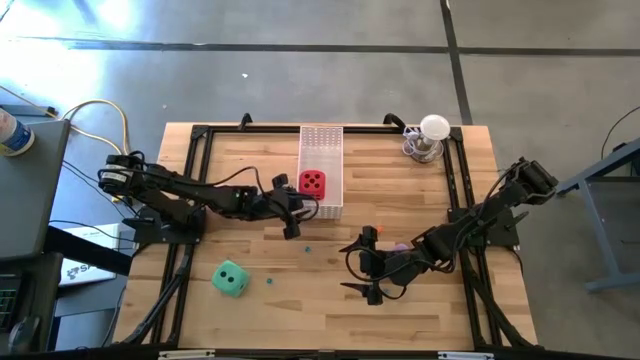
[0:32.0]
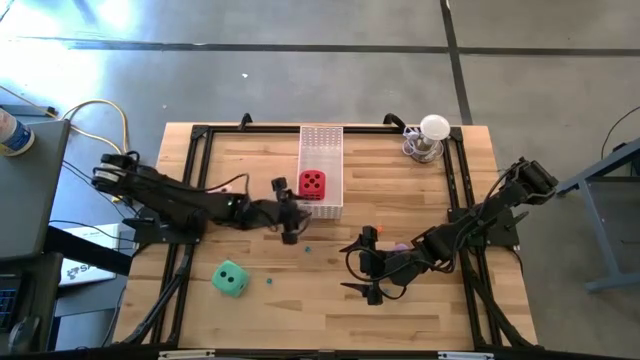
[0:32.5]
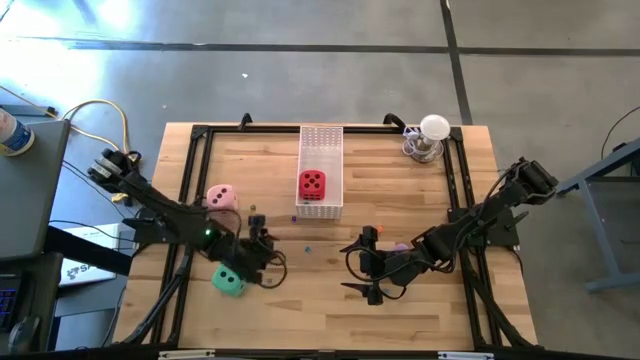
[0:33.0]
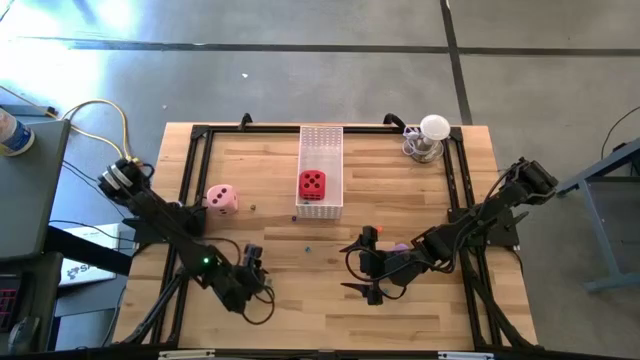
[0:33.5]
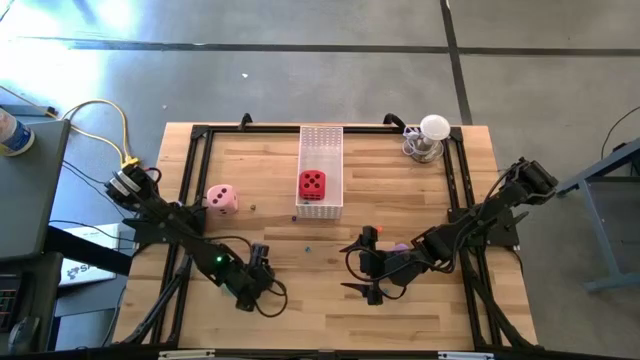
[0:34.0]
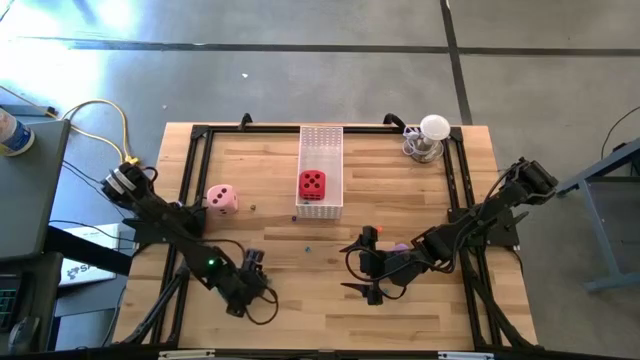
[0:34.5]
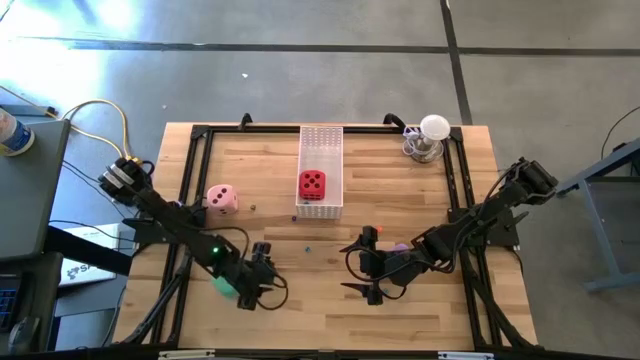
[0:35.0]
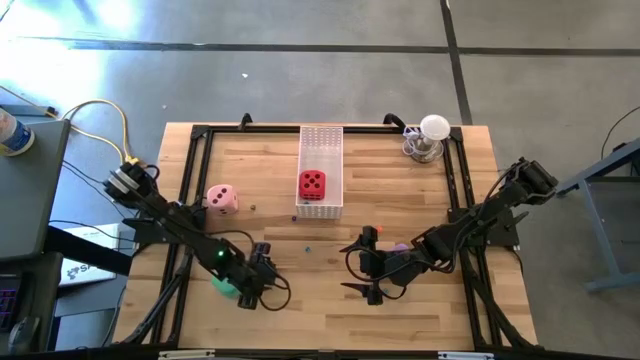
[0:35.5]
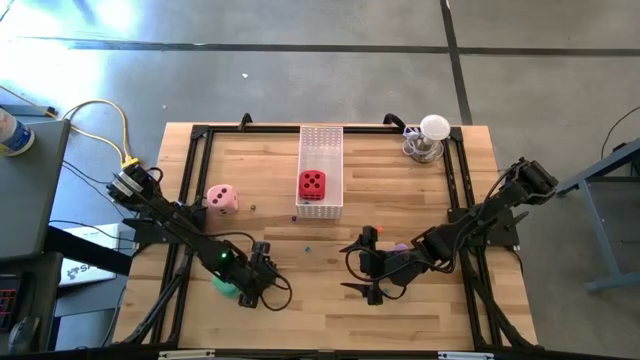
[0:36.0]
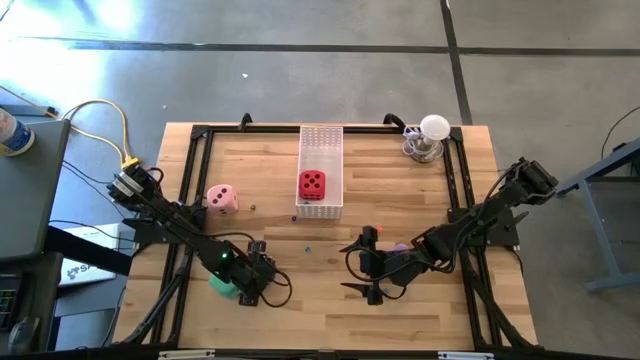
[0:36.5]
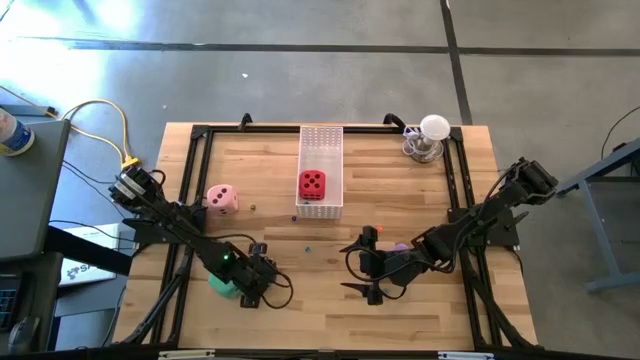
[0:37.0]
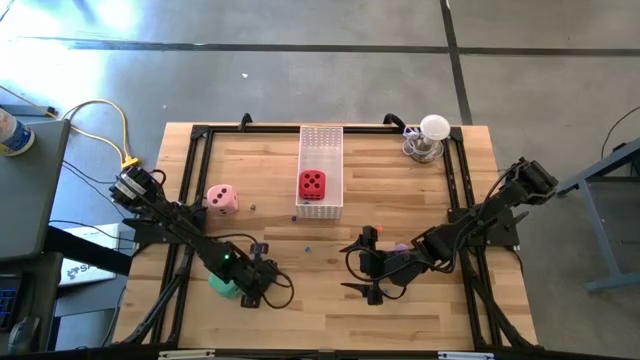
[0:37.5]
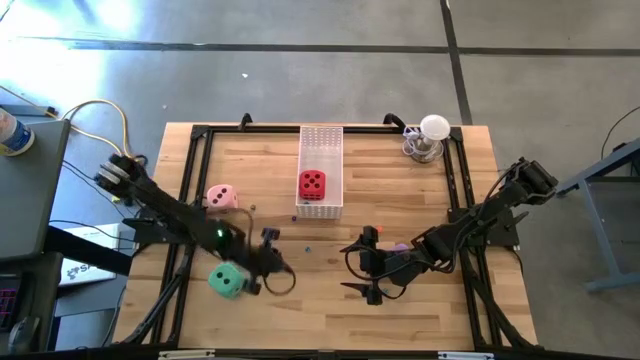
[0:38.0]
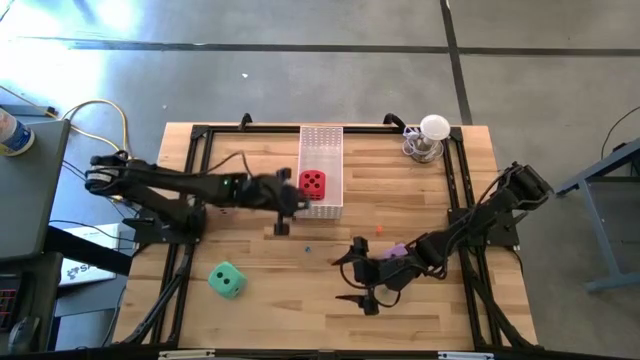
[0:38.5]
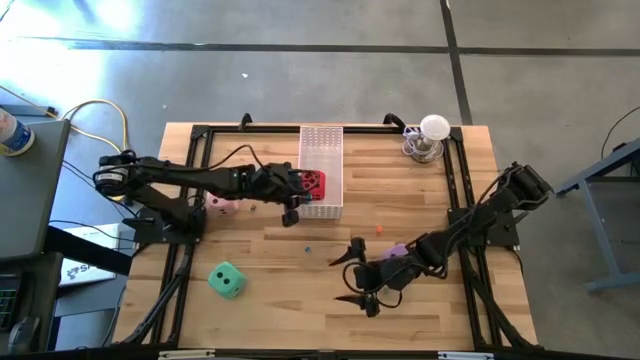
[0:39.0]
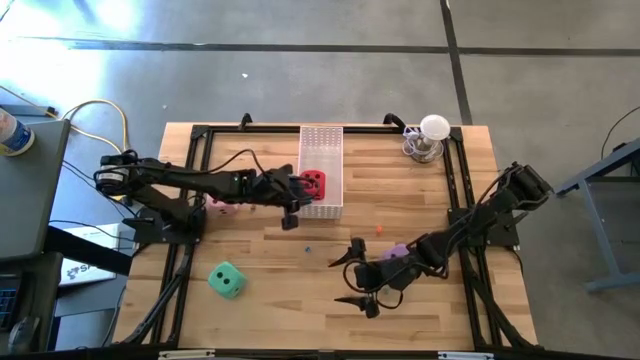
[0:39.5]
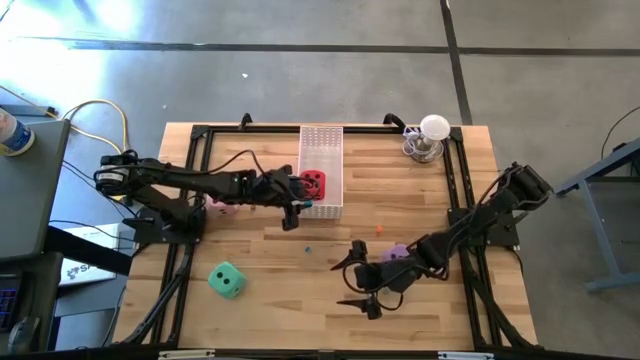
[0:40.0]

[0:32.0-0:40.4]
Task: Pick & Place Dice
Put the small light blue die into the bin

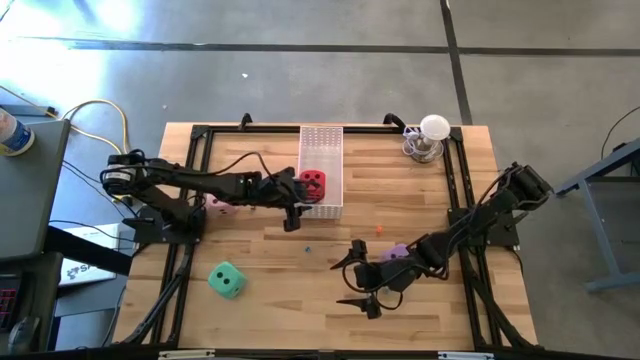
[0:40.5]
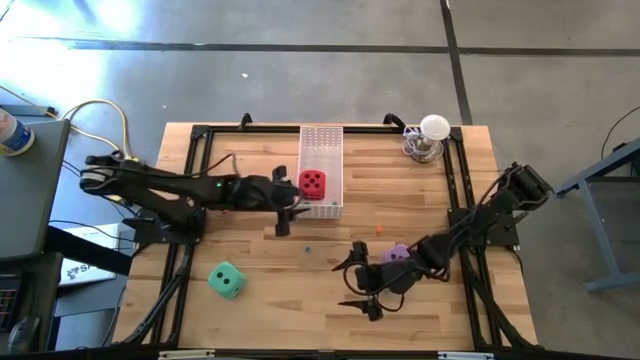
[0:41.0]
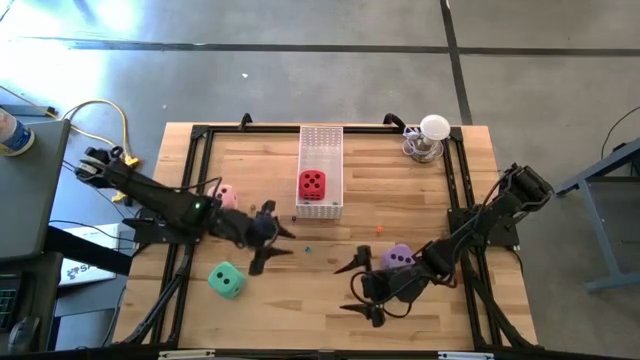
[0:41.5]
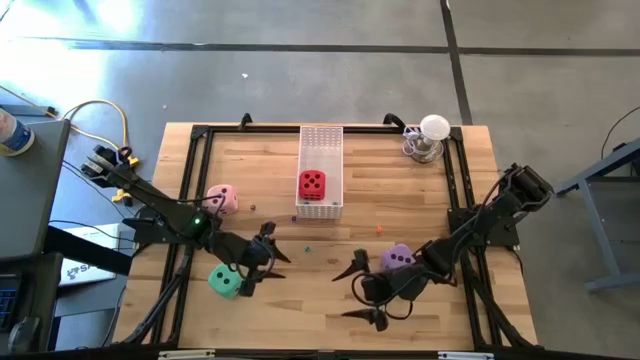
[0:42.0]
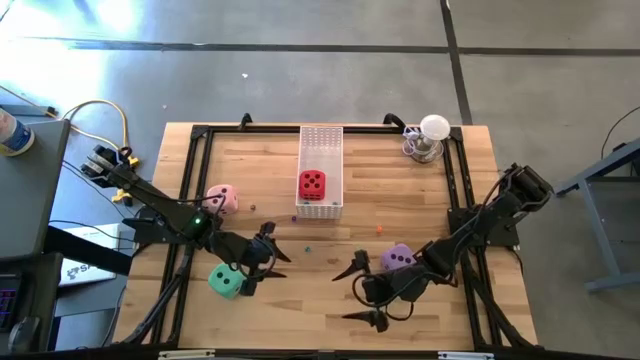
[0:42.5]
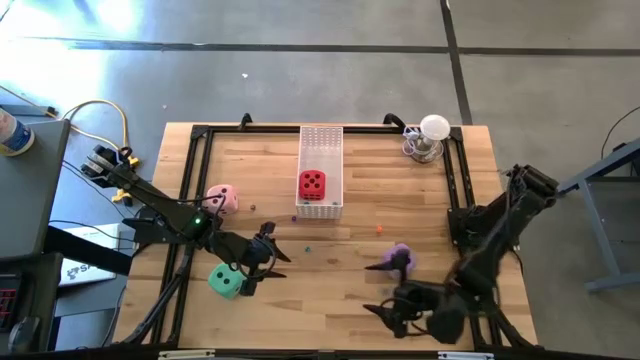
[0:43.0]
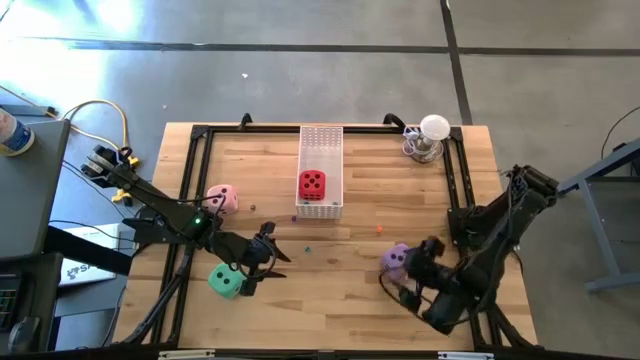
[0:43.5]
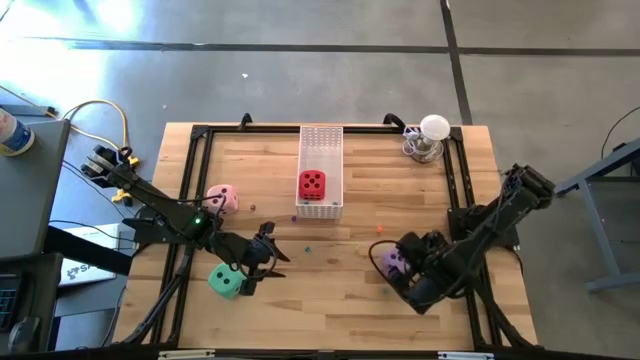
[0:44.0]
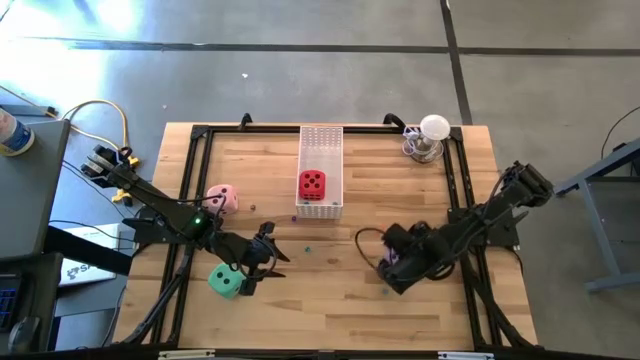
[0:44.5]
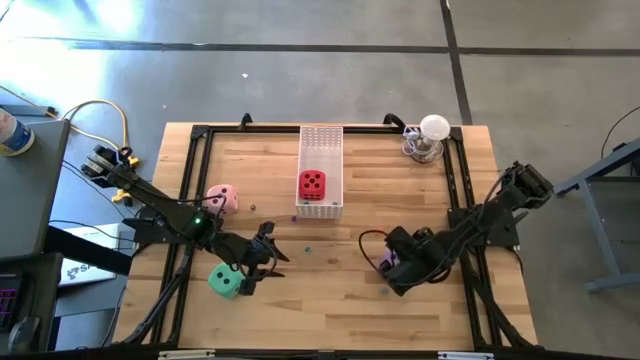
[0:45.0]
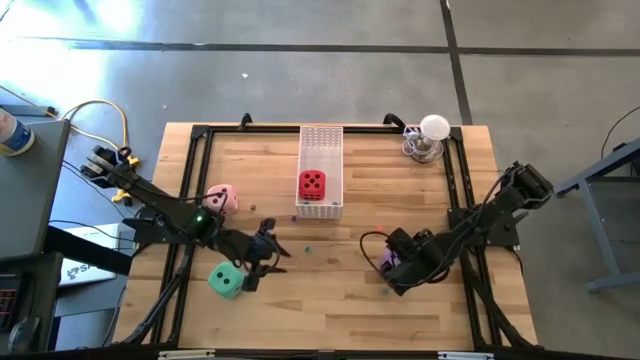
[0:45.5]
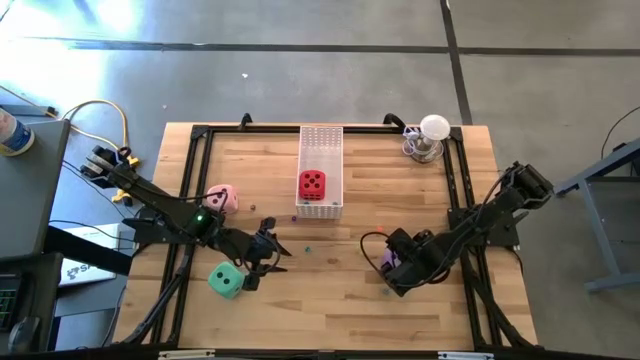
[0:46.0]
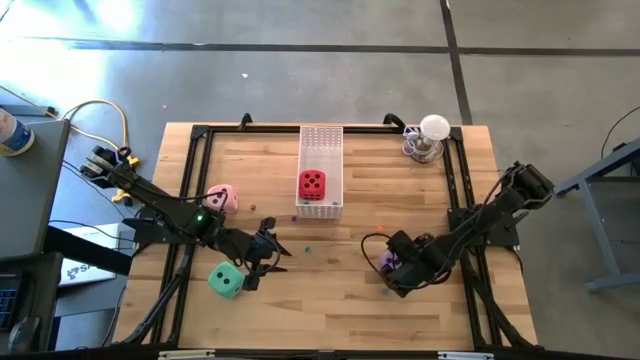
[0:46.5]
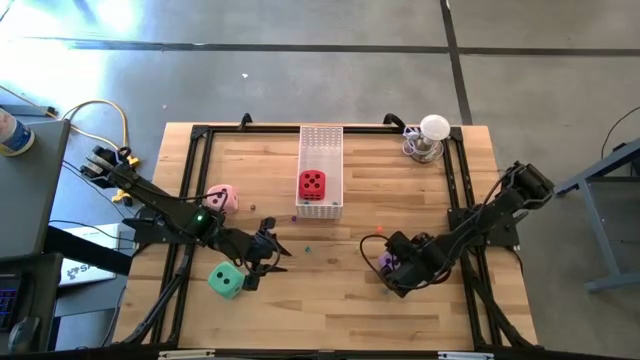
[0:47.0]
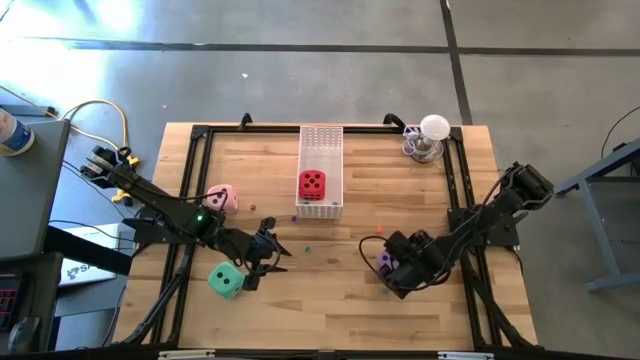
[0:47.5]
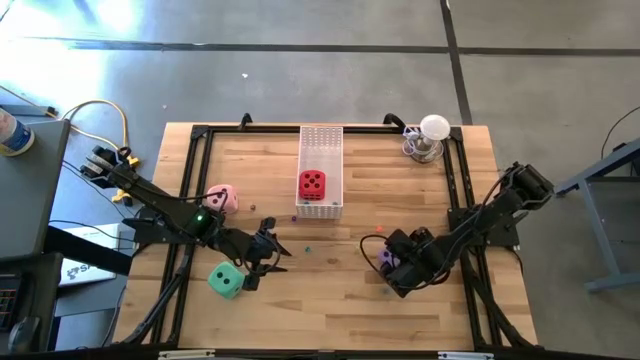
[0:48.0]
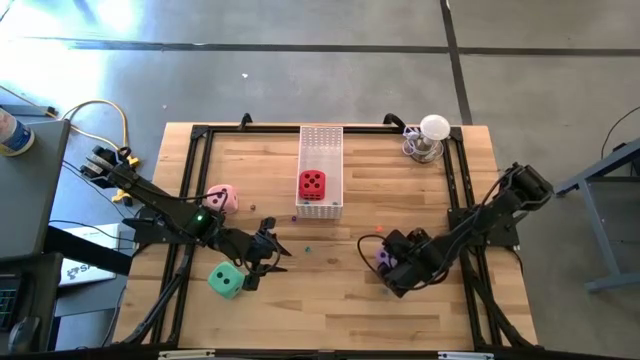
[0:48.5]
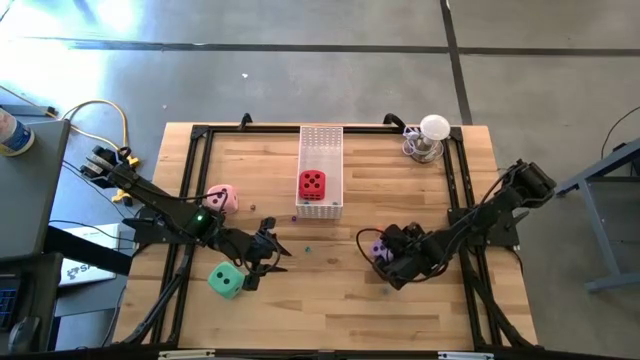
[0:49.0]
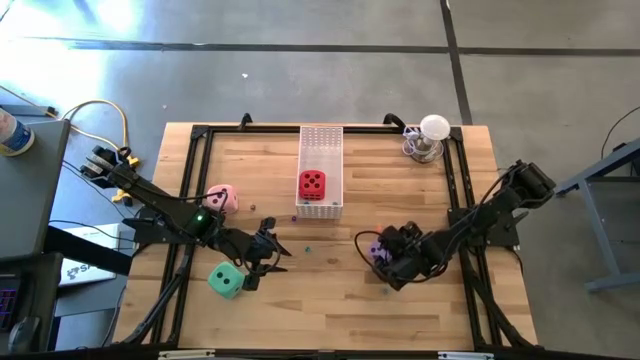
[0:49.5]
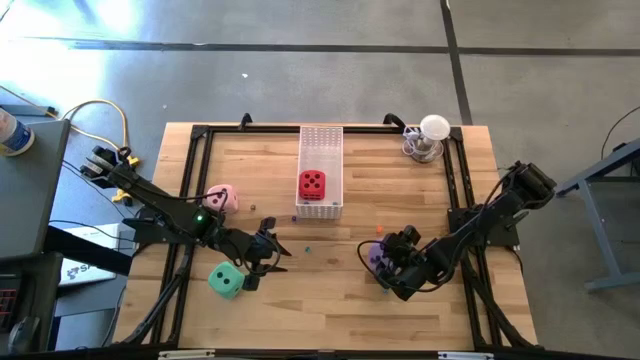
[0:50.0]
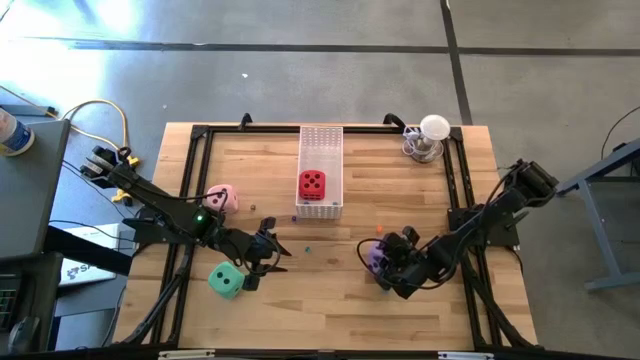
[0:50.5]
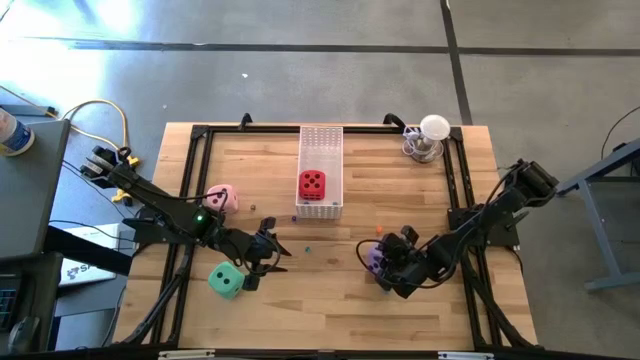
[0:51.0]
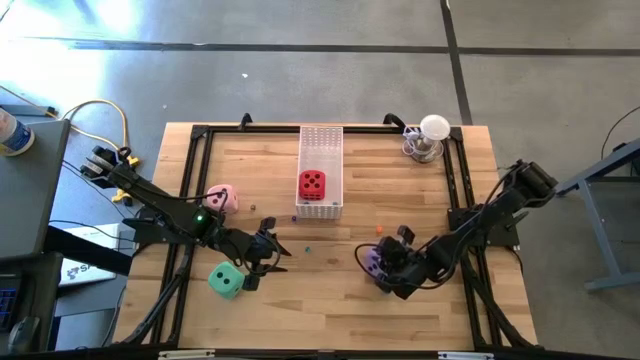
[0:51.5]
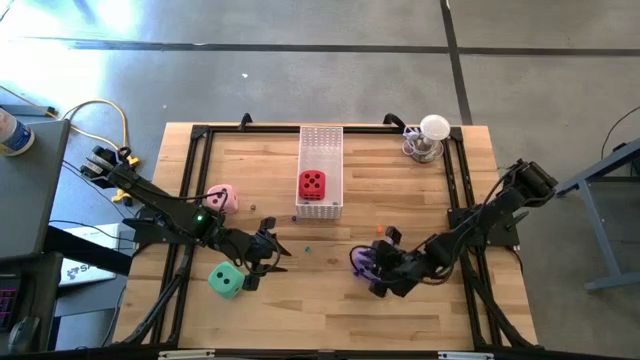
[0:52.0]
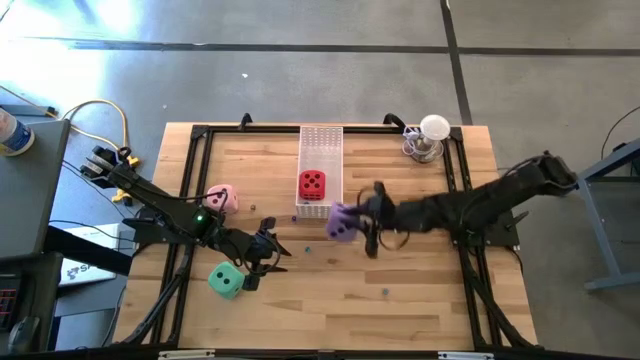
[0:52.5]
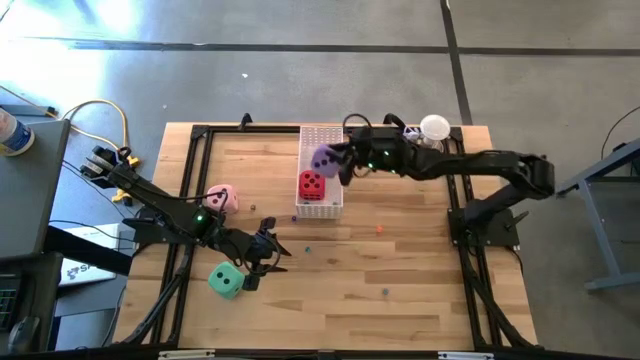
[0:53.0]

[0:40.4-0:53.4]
Put the large purple die into the bin

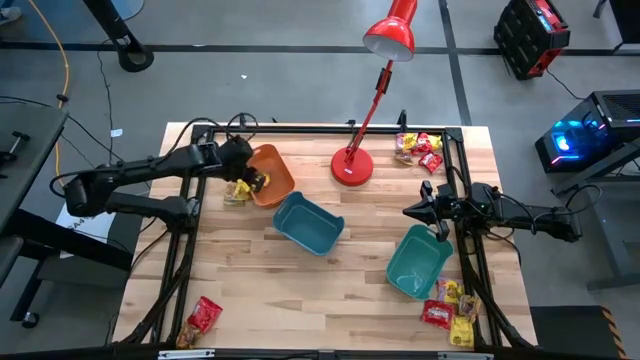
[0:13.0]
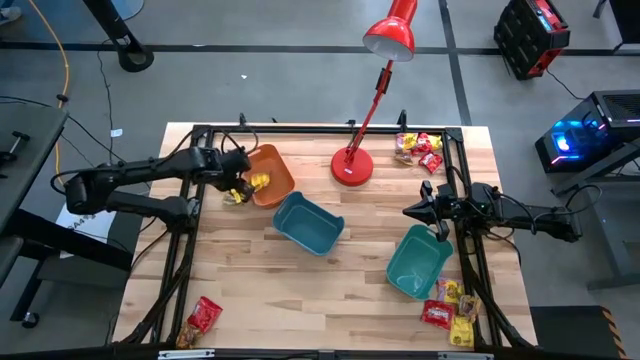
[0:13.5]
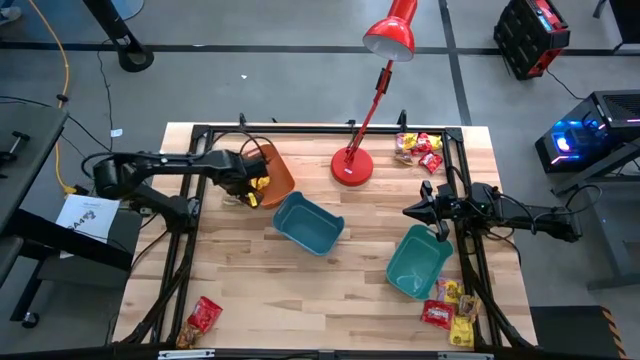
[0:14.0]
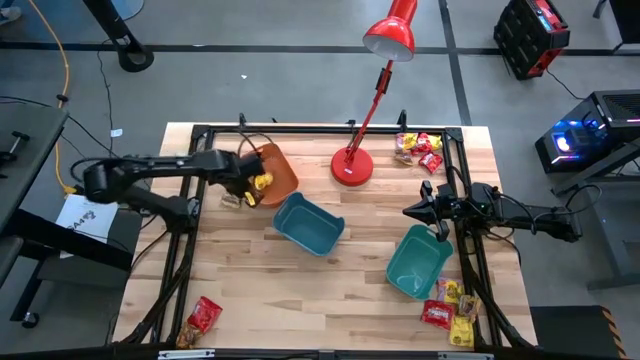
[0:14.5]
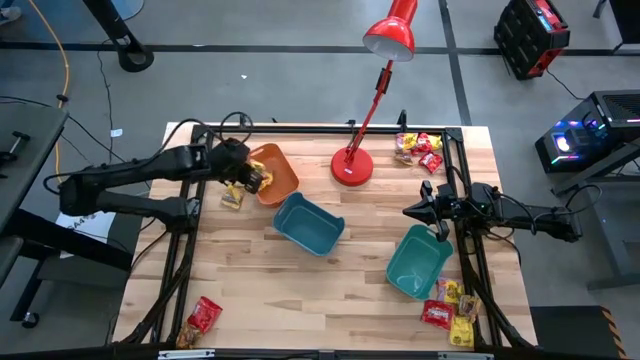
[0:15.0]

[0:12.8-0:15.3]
Task: Sort candy
Put the top left yellow candy into the orange bin
